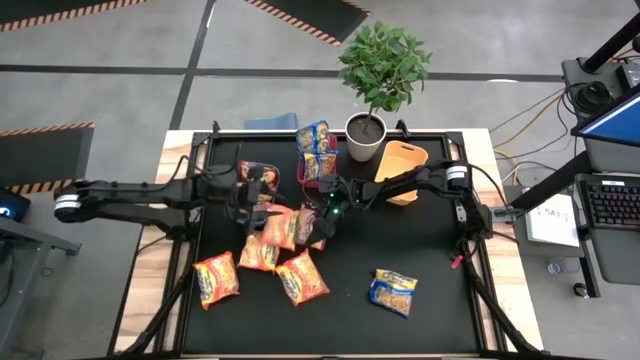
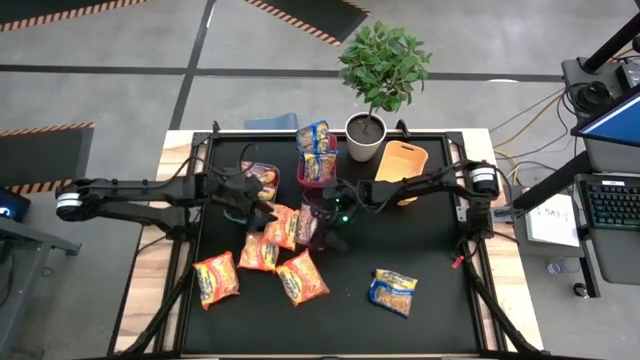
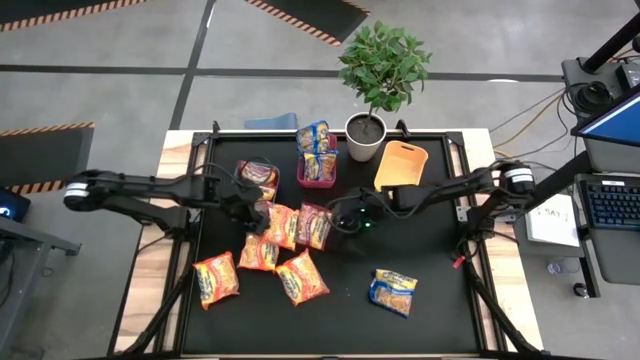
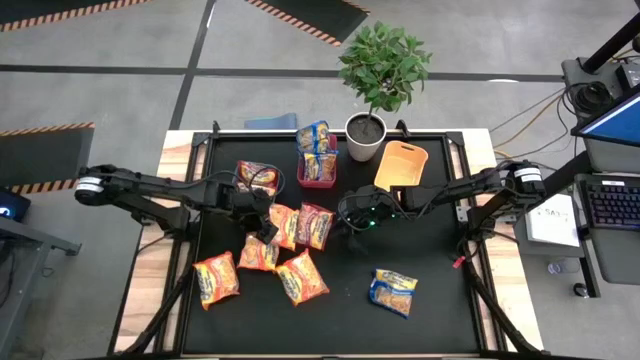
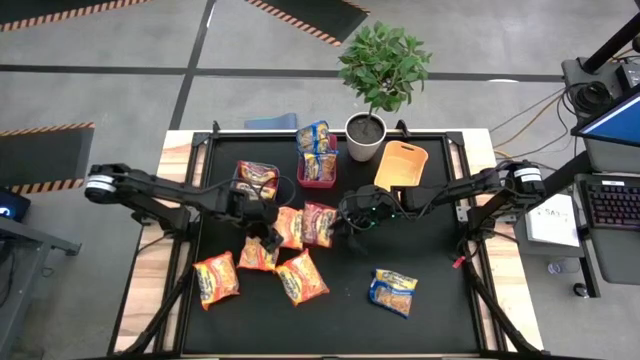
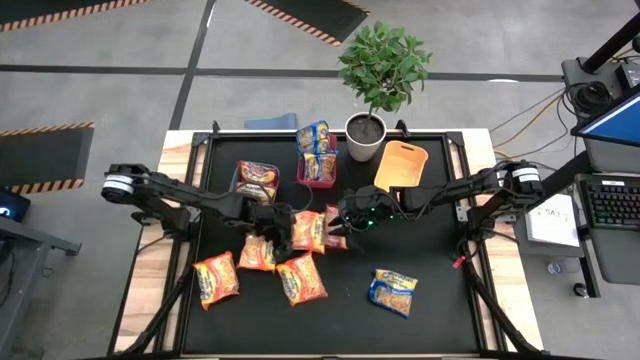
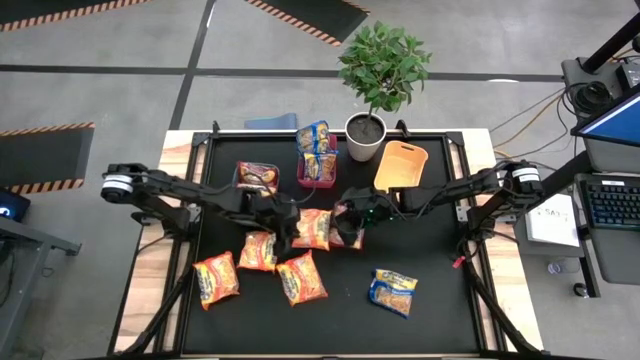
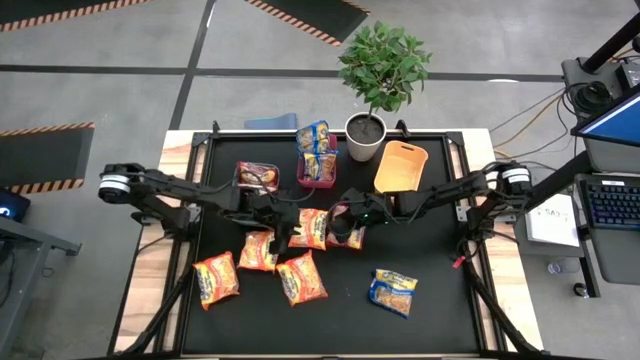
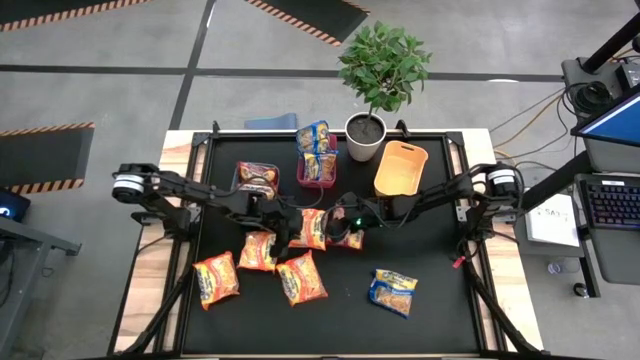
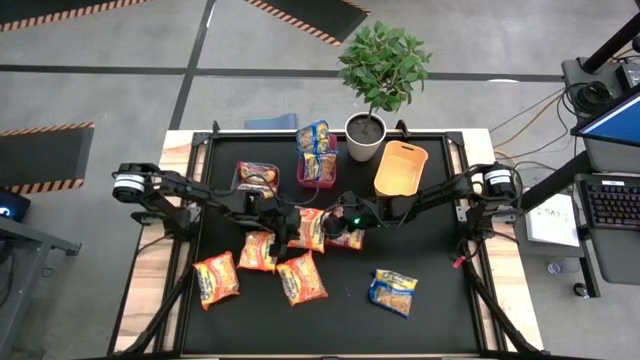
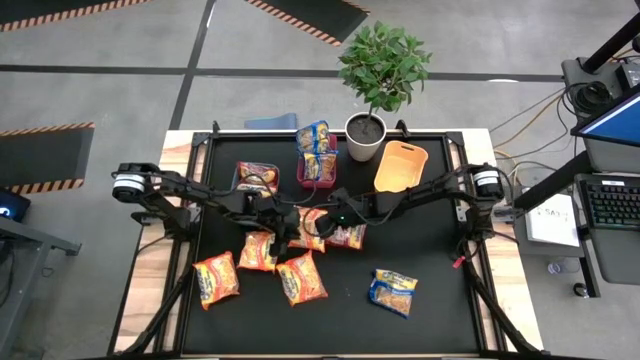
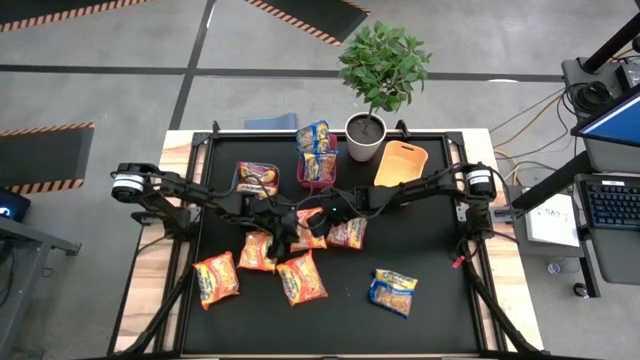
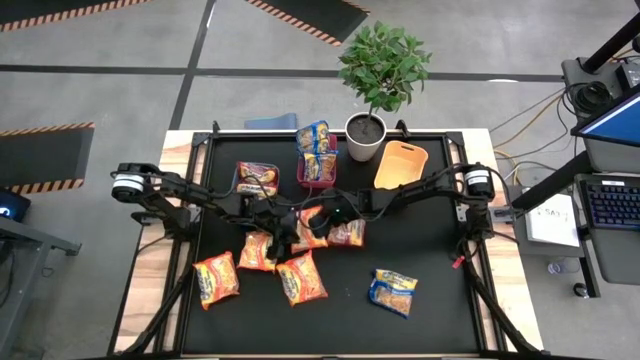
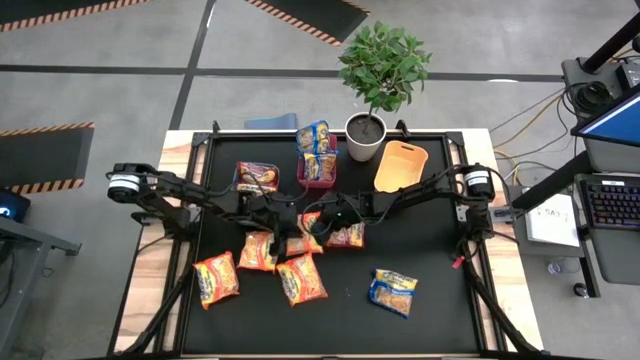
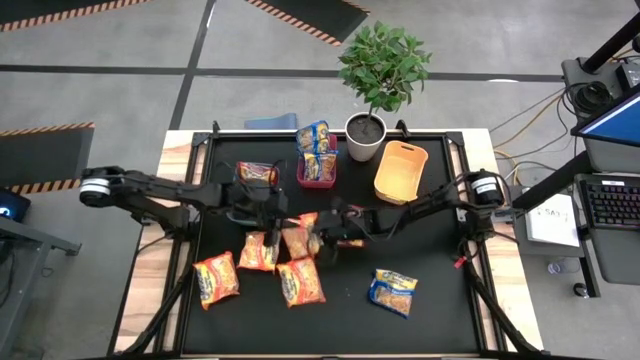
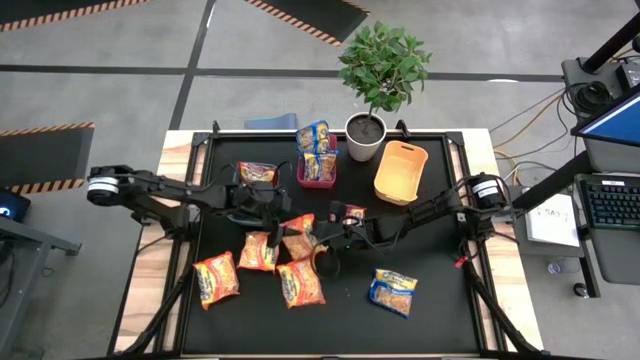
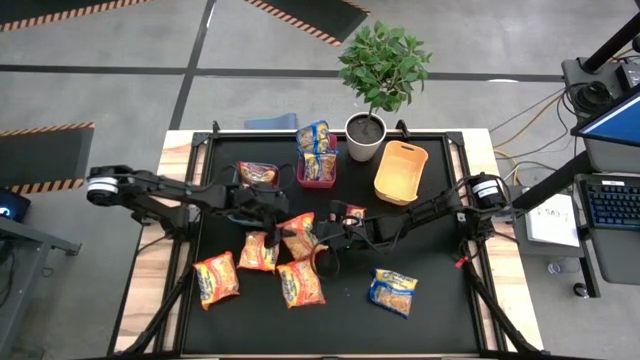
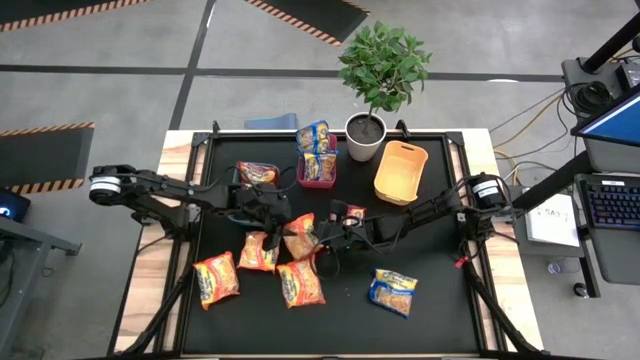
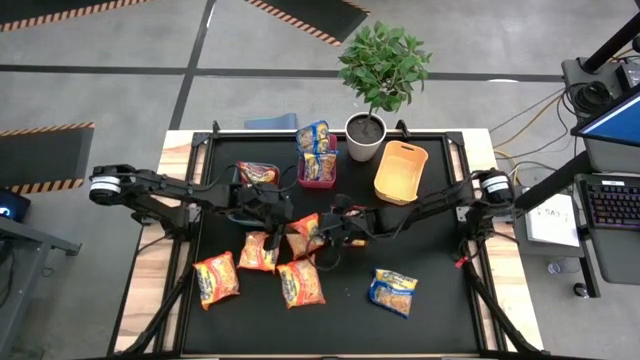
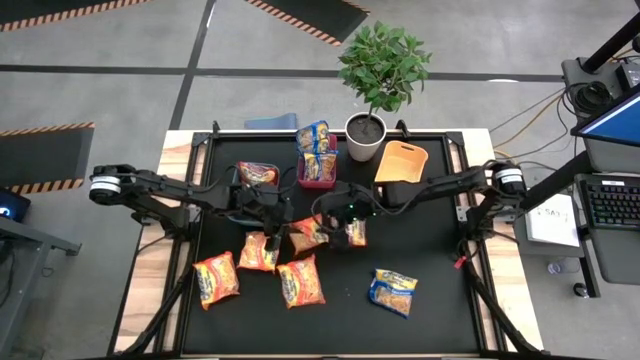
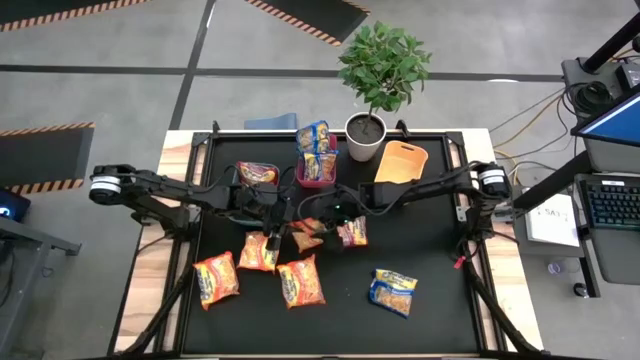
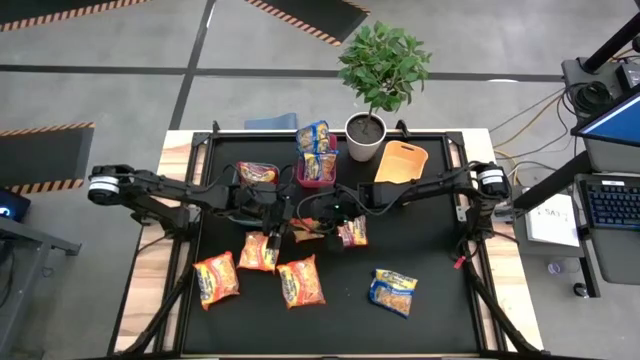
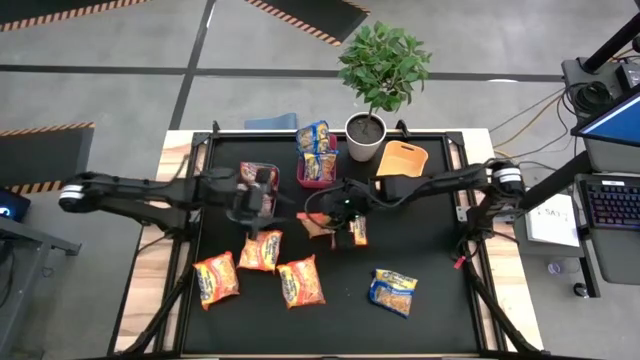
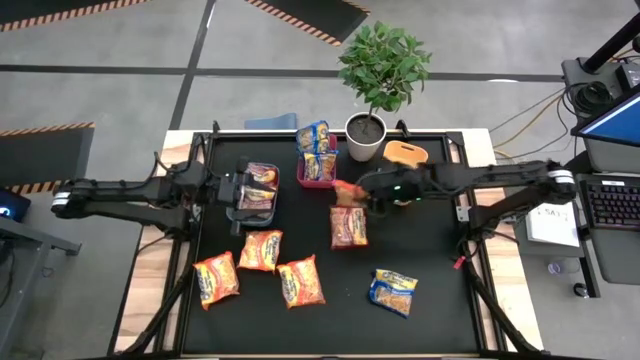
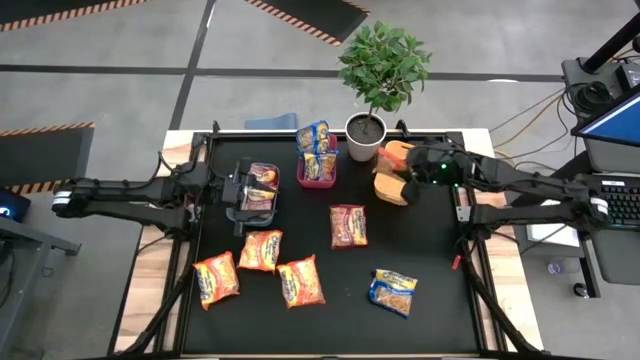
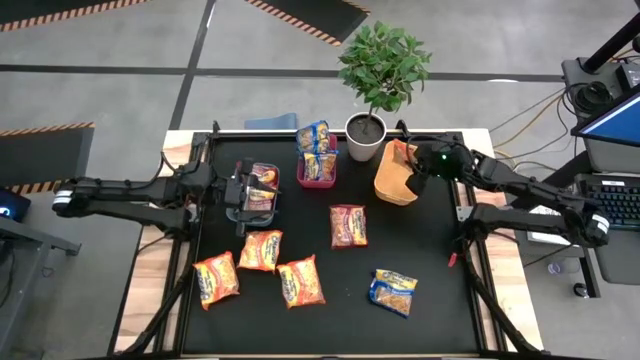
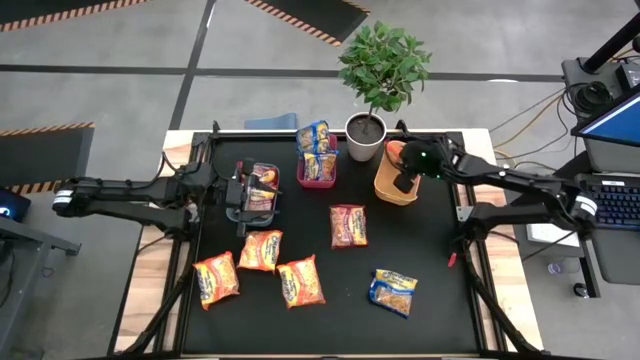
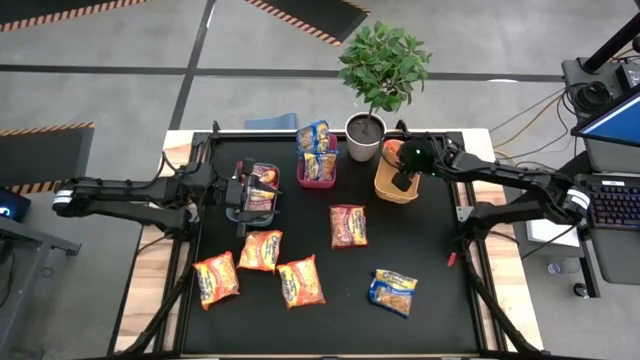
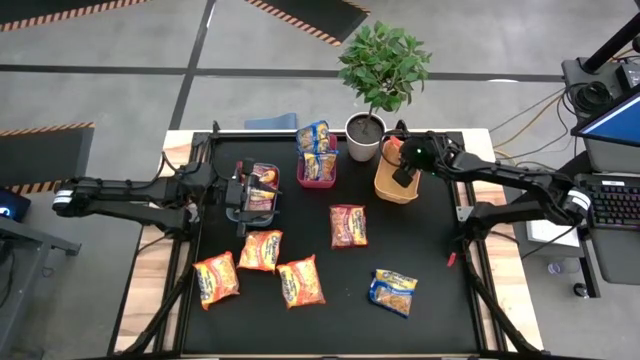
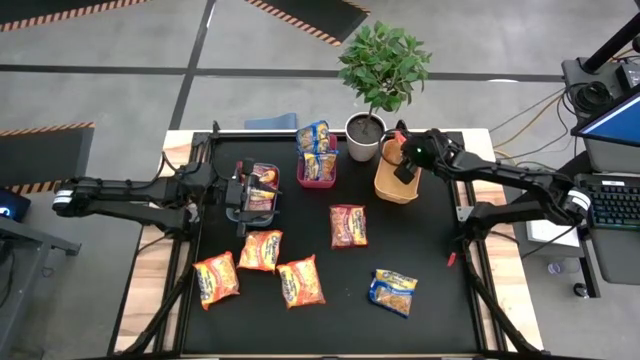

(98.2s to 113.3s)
Task: Sort Maruchan noodles
Put the orange noodle pack into the yellow bin

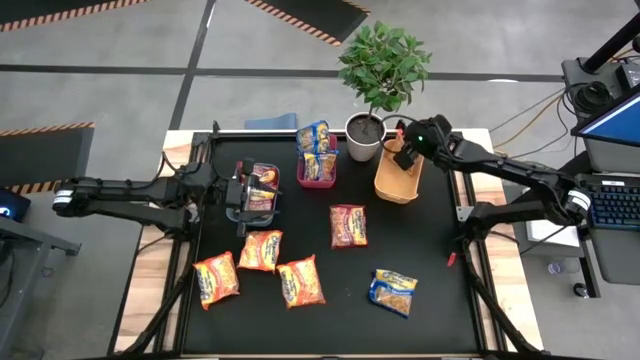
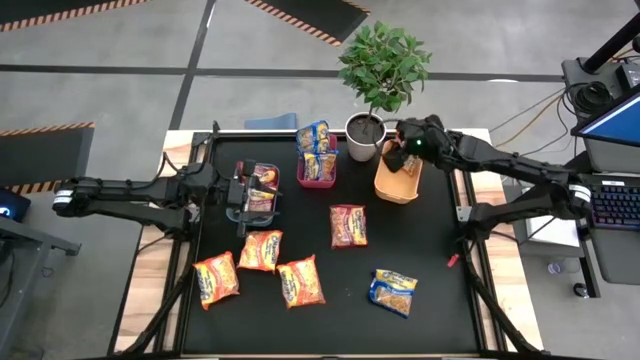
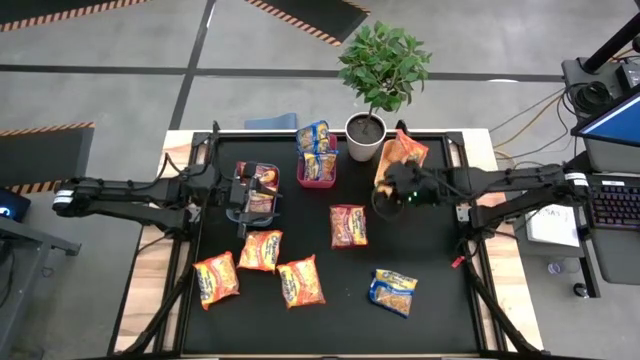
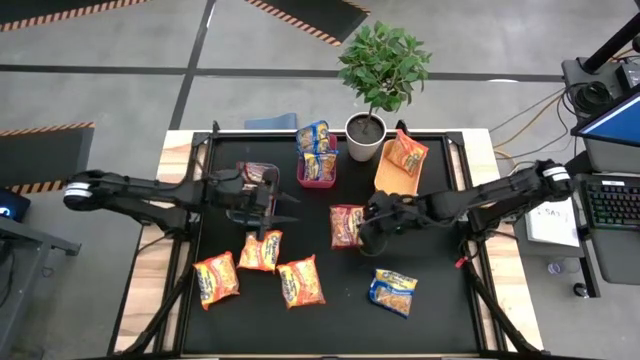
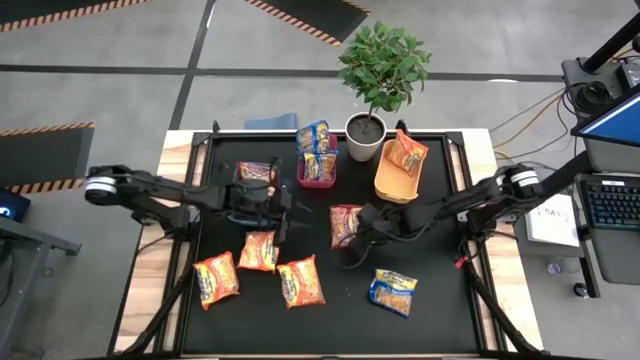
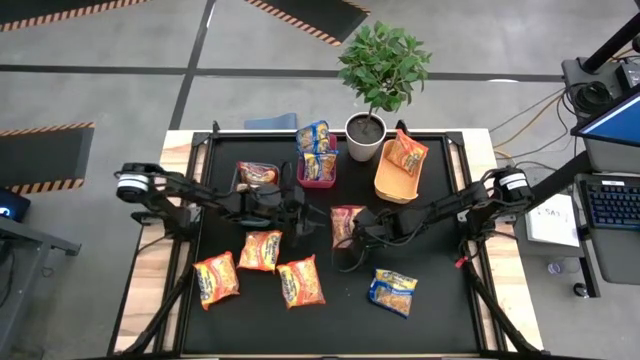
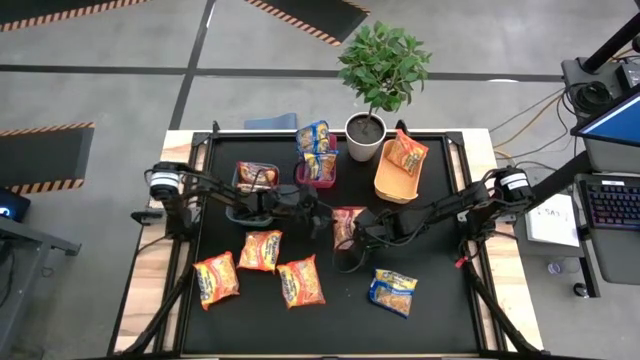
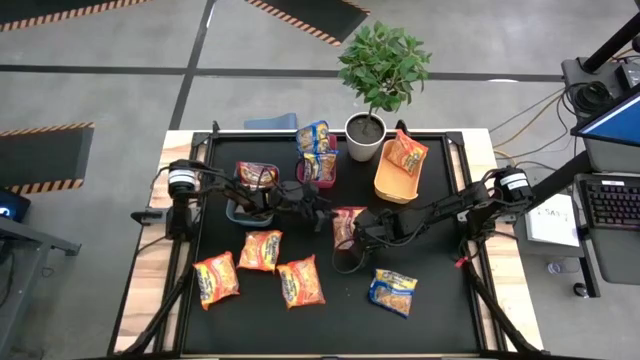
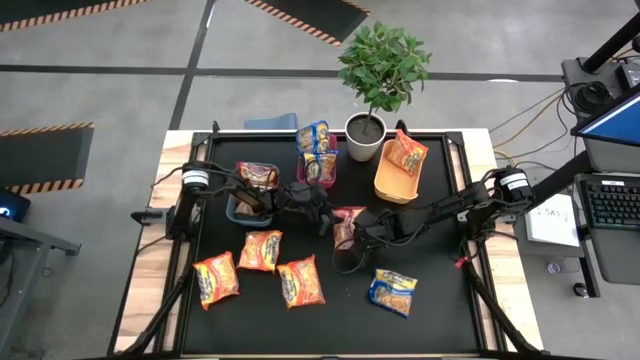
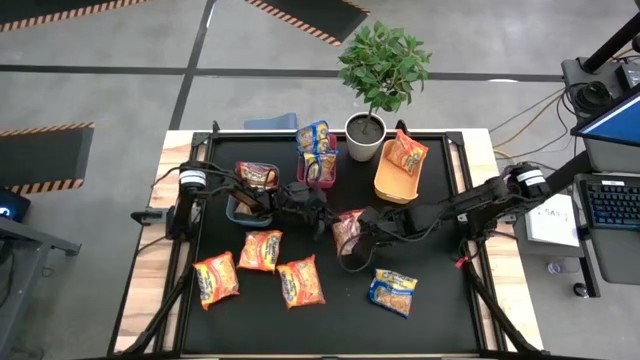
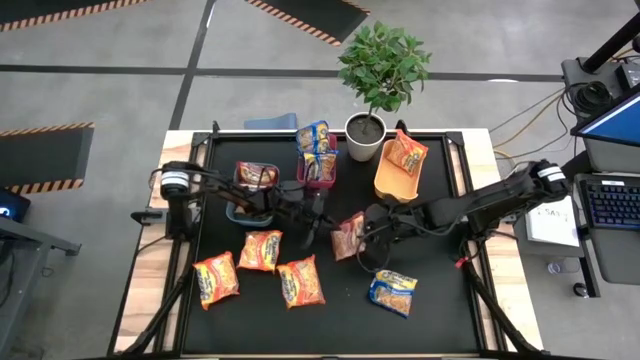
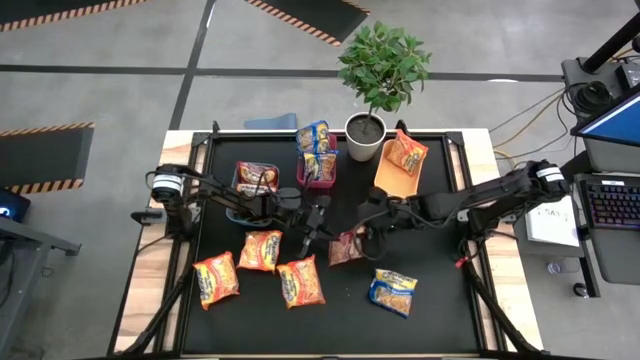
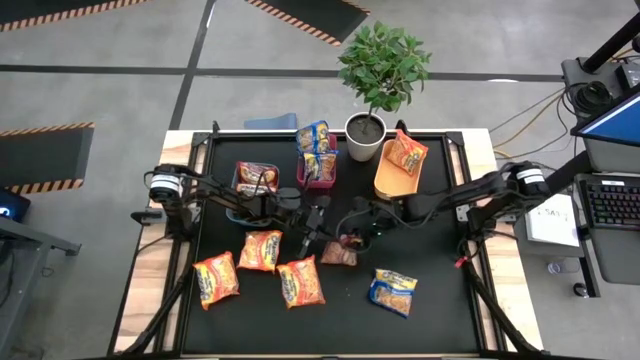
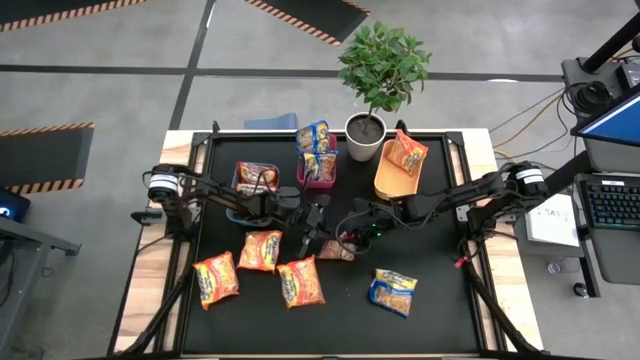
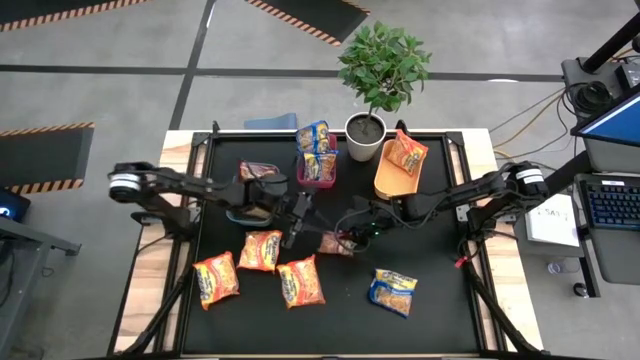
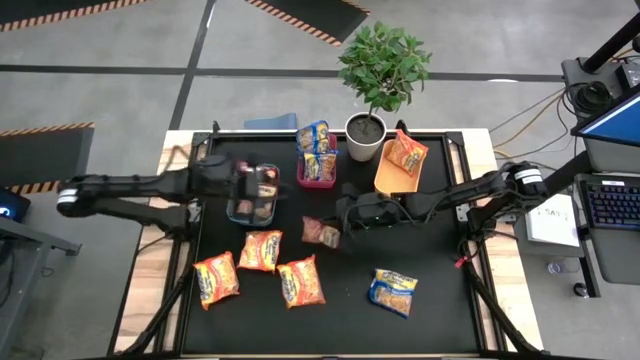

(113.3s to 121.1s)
Put the red noodle pack into the blue bin
